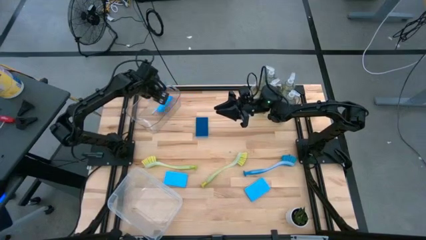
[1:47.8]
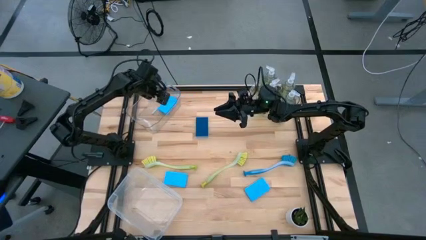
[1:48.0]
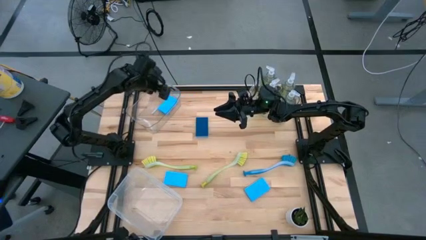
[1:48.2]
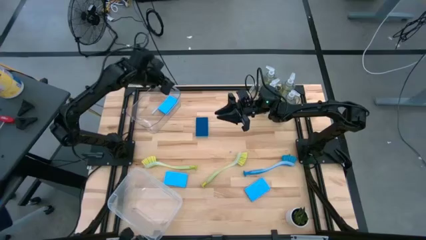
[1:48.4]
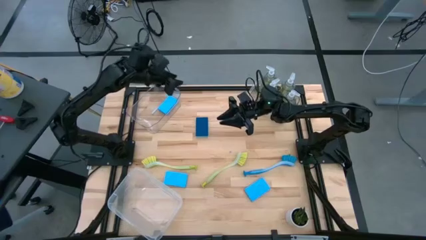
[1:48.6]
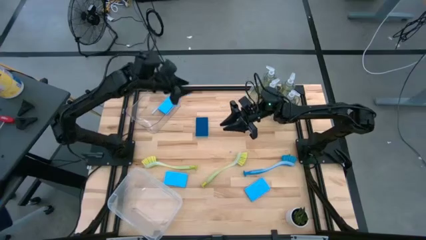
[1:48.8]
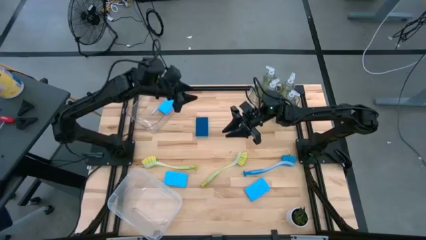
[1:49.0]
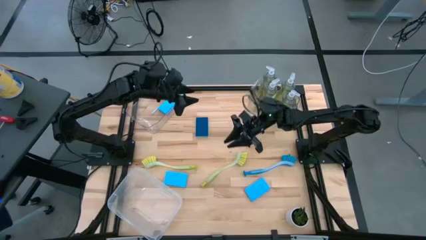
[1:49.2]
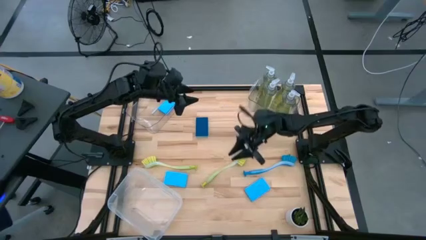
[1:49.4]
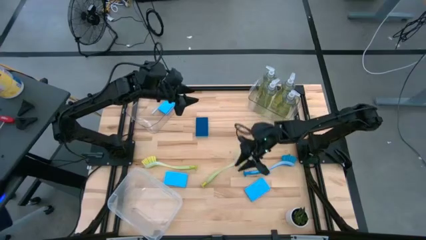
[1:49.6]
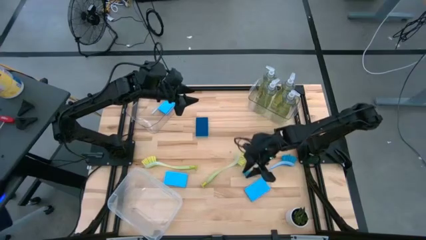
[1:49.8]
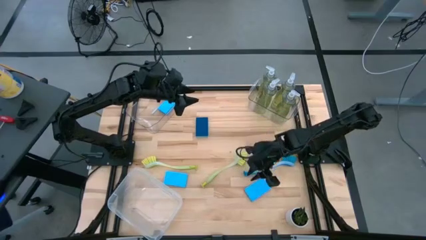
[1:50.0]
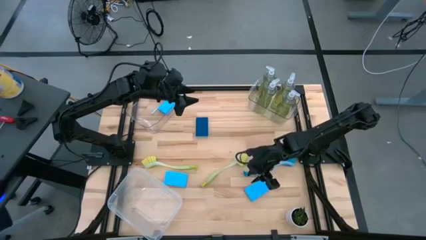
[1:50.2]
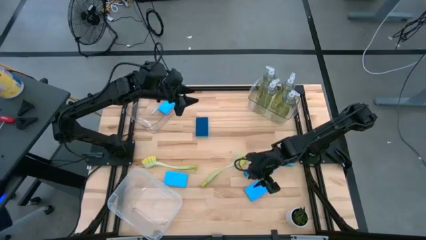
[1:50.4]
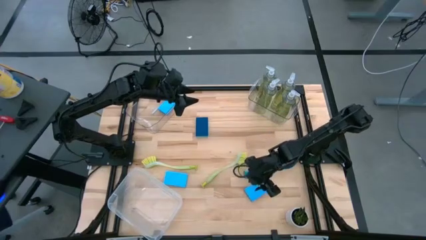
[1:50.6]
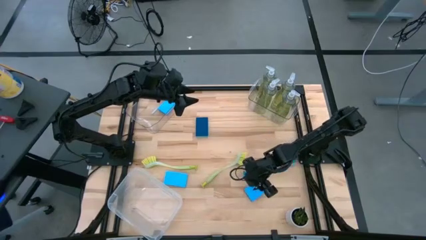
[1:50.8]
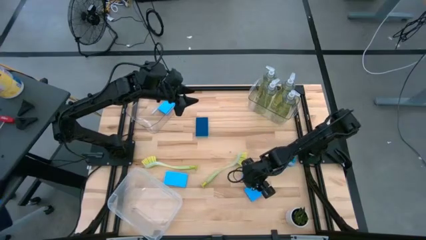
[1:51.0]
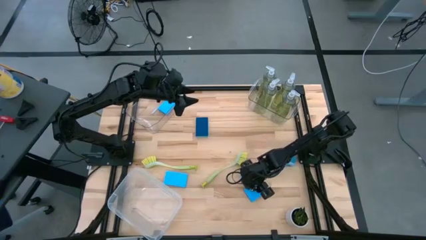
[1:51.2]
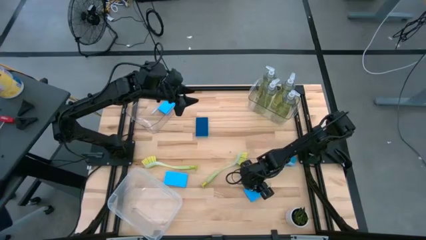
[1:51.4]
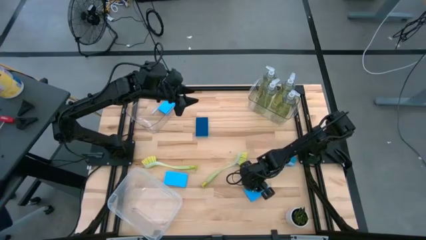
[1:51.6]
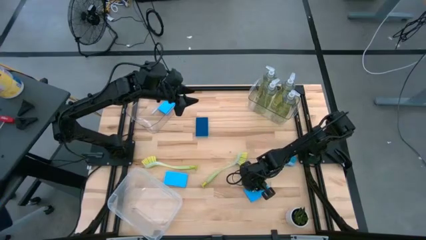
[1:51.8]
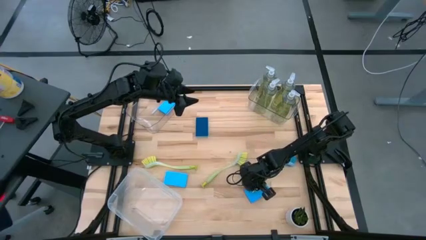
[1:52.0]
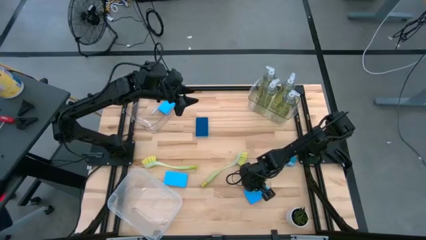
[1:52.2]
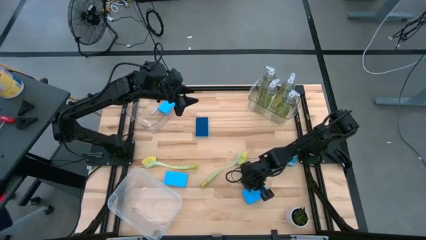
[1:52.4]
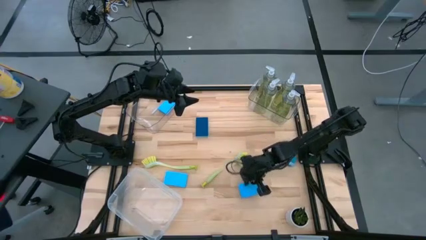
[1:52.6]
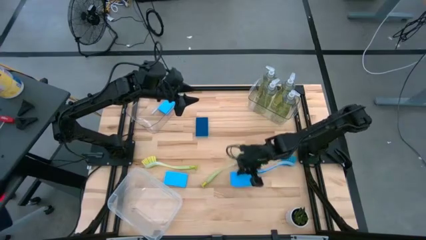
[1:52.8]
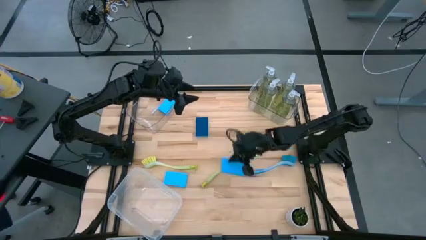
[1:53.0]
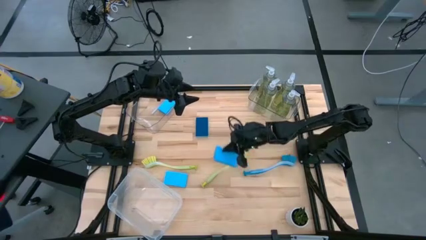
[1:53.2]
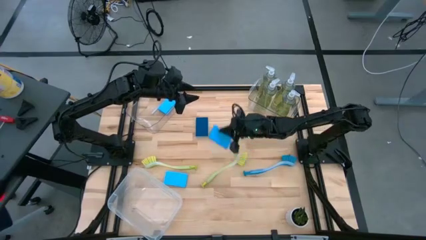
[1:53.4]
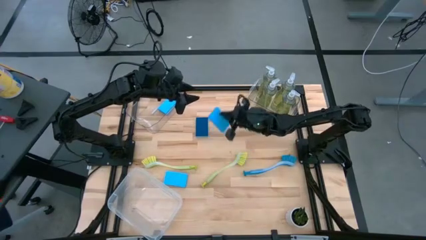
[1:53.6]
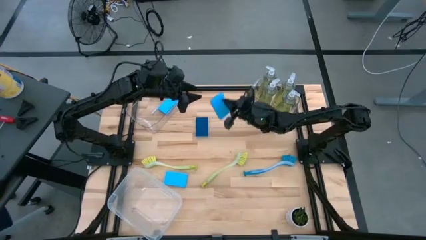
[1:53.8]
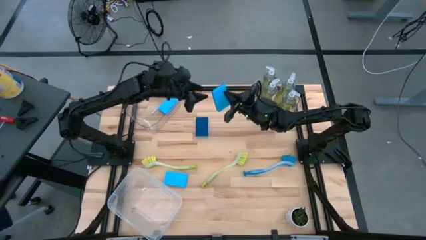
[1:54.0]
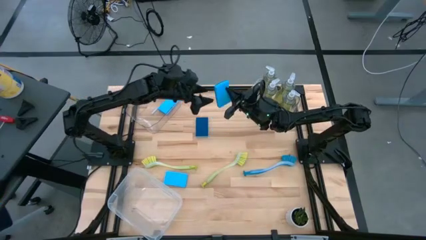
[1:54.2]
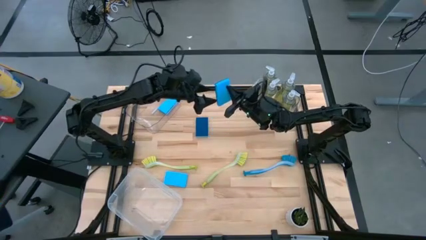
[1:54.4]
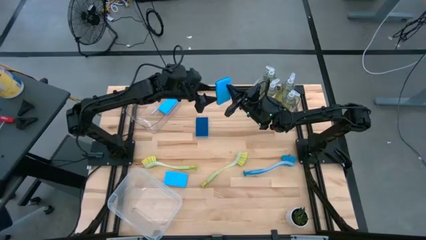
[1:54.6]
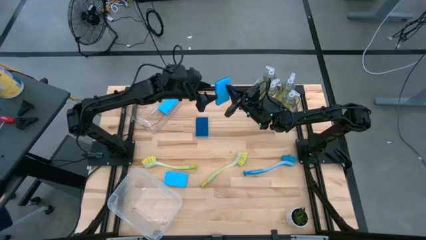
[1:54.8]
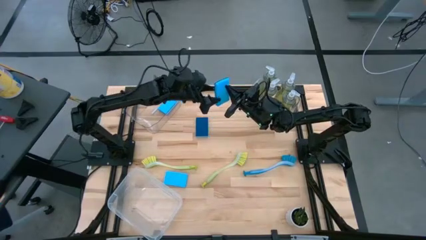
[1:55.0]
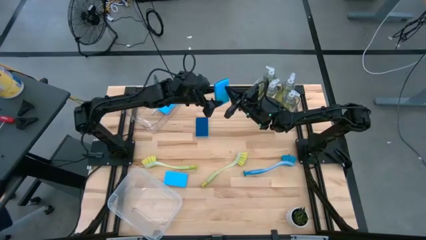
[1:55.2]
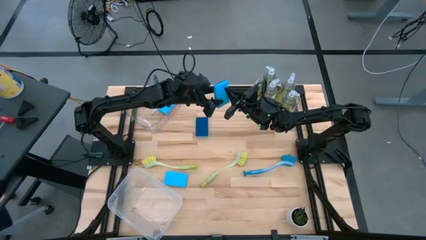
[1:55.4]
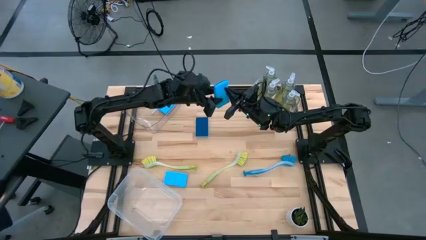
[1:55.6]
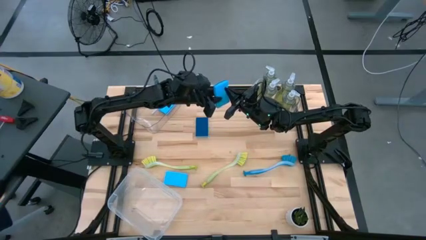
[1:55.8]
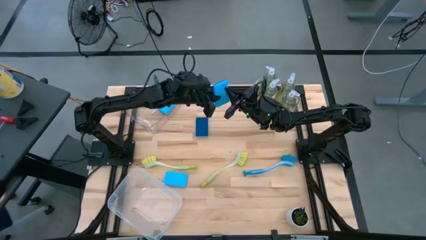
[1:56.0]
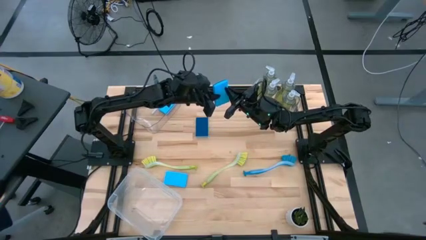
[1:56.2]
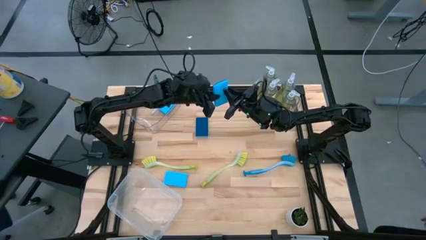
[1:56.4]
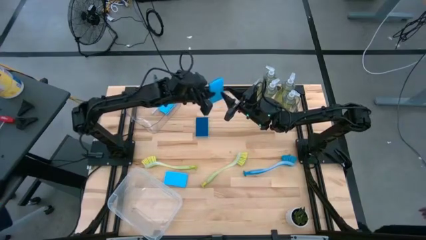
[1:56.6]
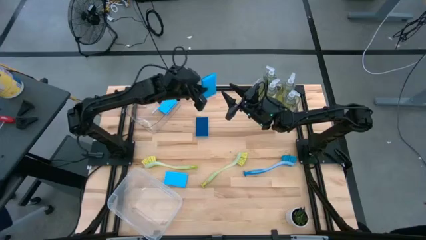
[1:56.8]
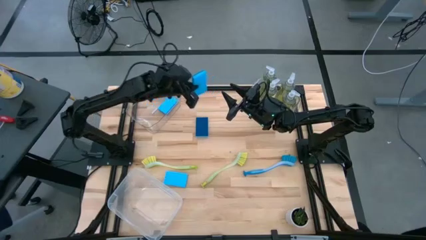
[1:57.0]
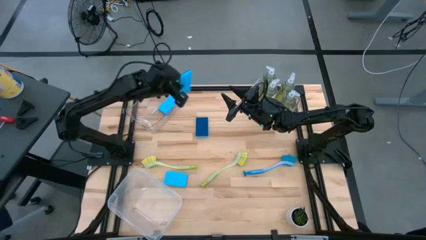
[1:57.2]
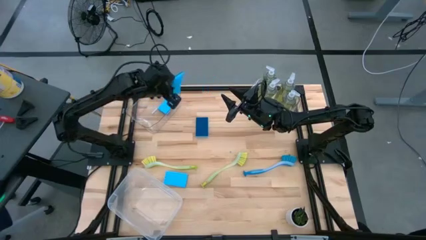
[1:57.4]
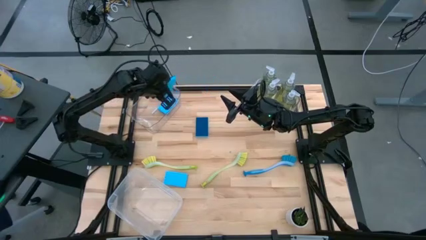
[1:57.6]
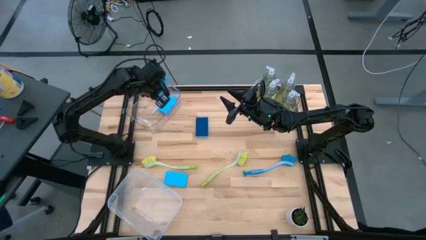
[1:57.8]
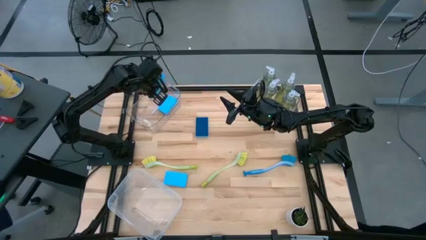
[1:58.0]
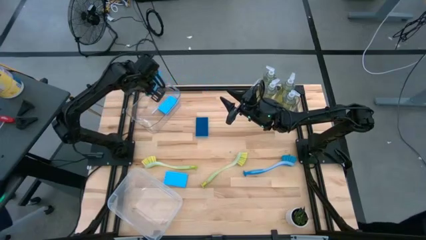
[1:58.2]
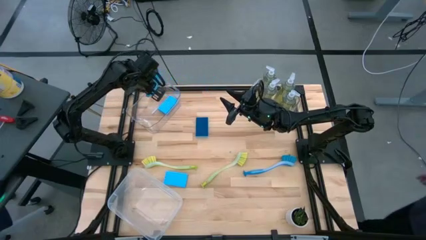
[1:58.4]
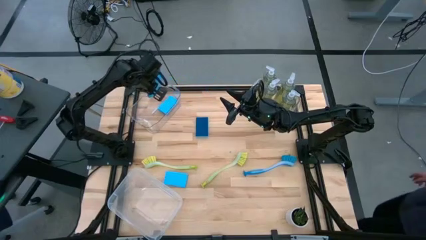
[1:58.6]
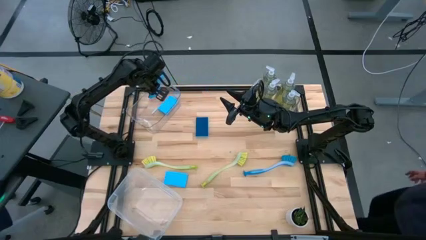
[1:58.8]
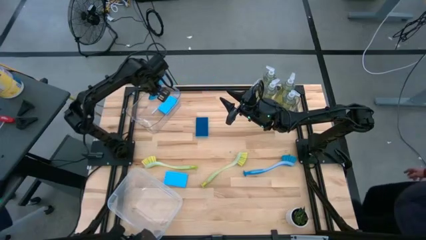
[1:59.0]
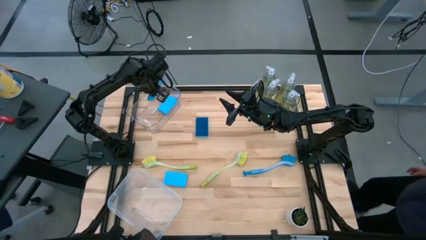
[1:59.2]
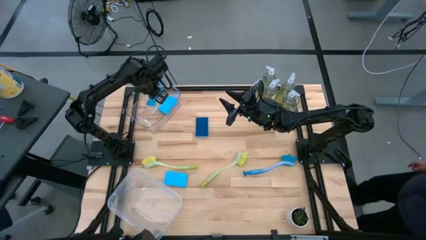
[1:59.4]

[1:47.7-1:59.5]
Task: Pick & Place Kitchen Sink Supplies
Put the blue sponge into the left transparent bin

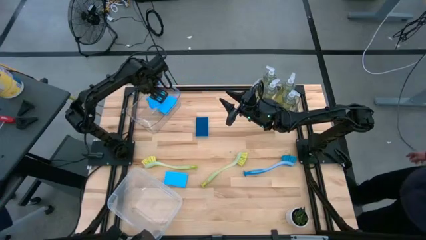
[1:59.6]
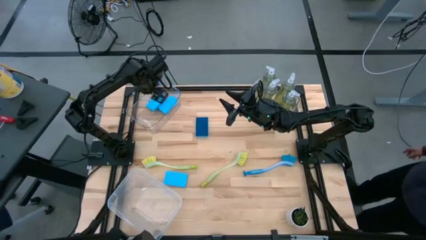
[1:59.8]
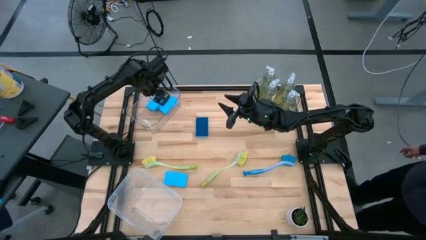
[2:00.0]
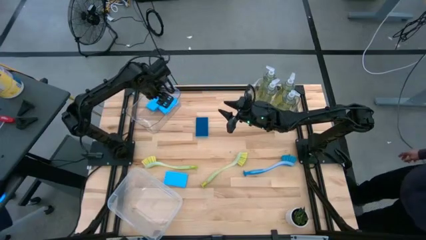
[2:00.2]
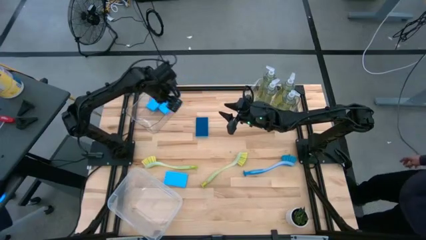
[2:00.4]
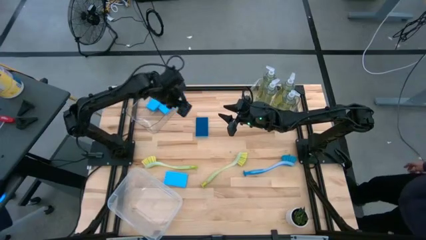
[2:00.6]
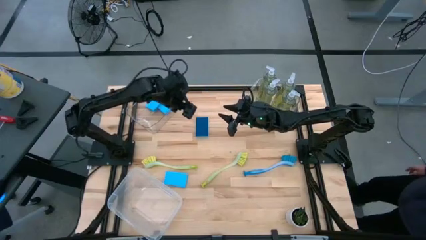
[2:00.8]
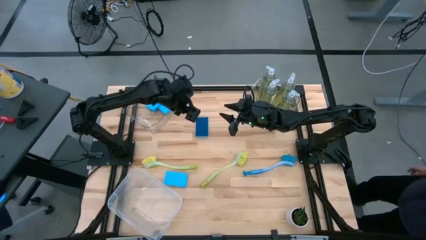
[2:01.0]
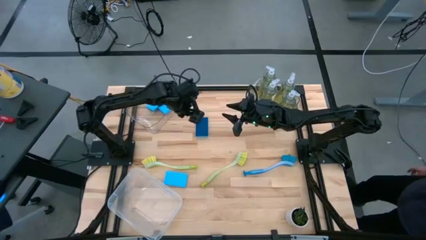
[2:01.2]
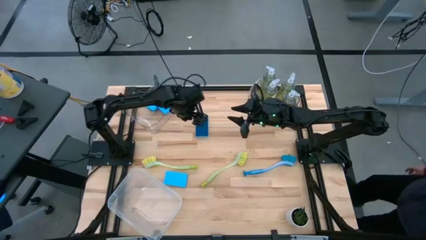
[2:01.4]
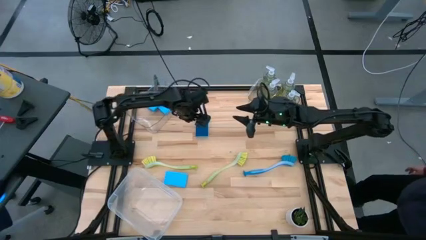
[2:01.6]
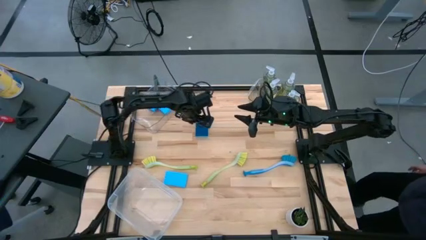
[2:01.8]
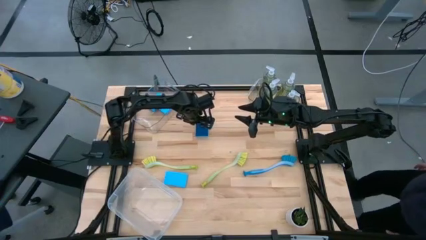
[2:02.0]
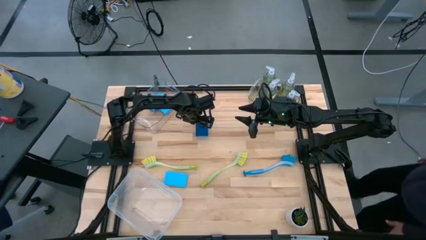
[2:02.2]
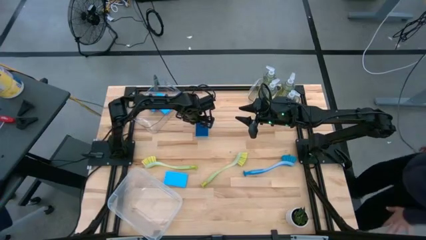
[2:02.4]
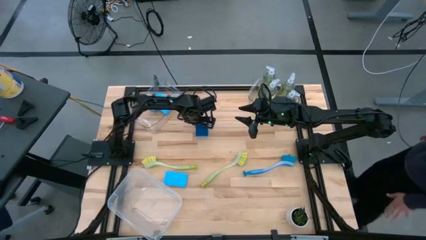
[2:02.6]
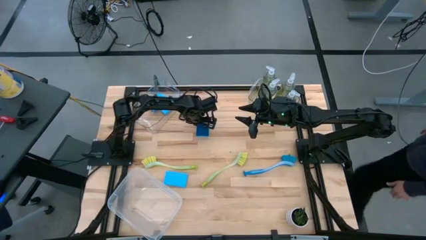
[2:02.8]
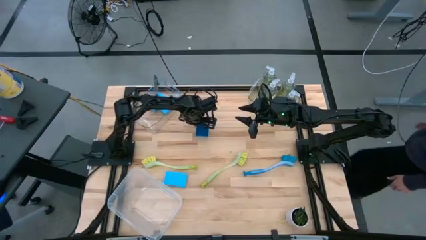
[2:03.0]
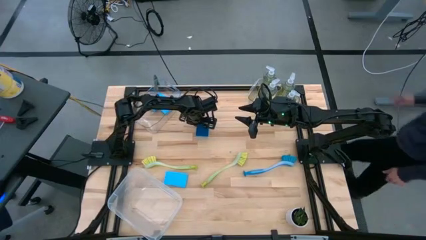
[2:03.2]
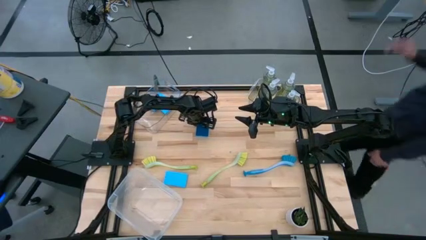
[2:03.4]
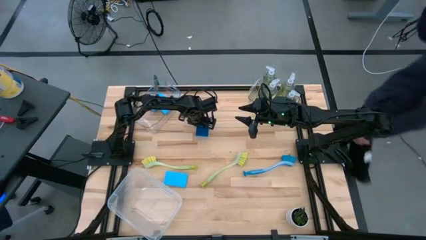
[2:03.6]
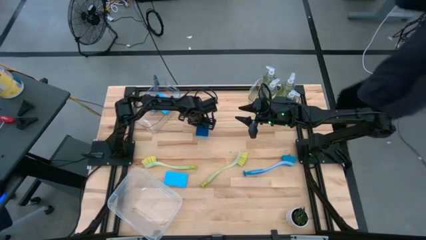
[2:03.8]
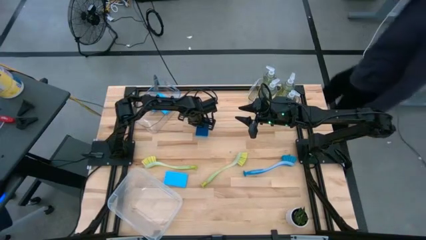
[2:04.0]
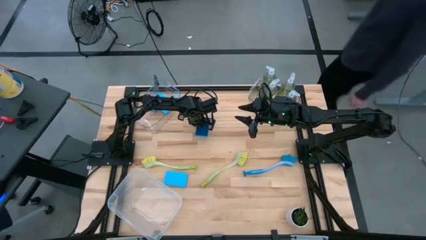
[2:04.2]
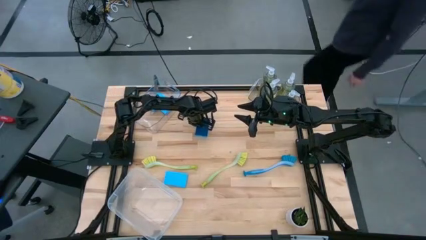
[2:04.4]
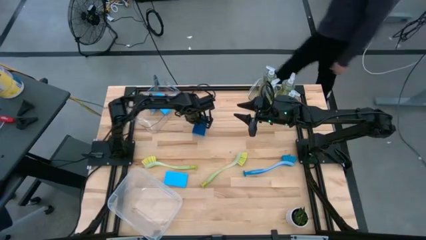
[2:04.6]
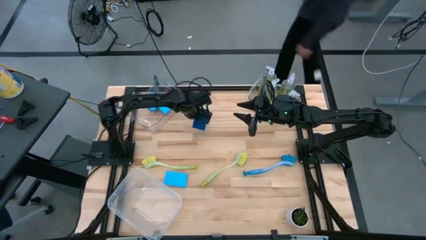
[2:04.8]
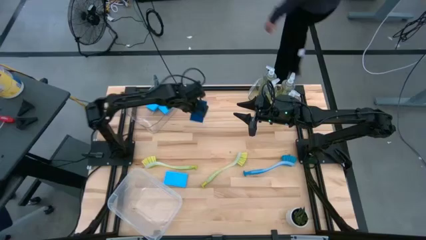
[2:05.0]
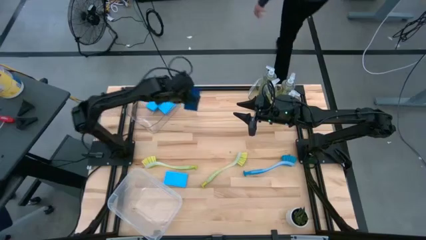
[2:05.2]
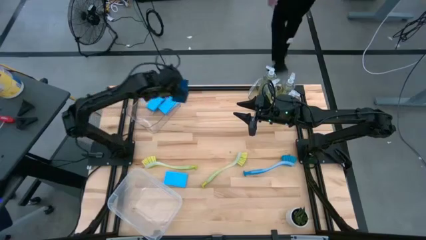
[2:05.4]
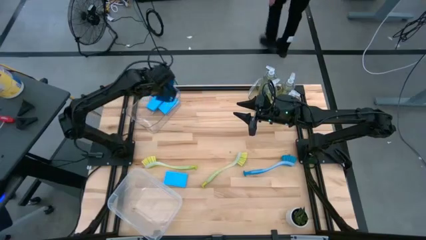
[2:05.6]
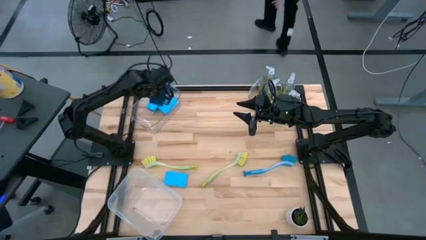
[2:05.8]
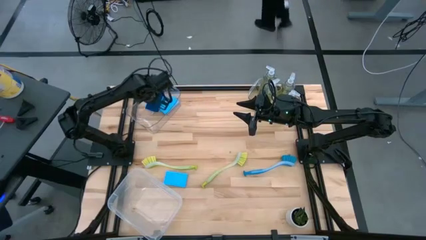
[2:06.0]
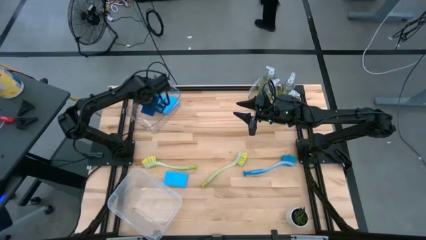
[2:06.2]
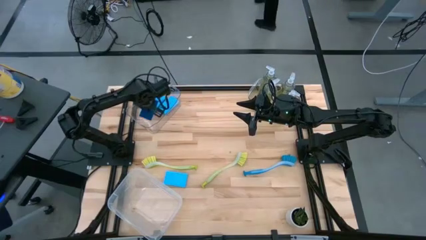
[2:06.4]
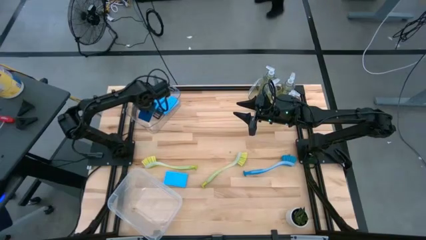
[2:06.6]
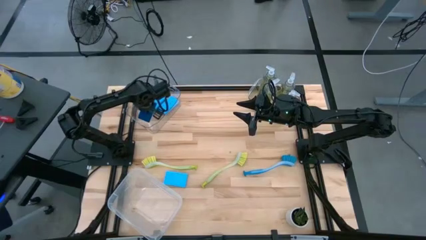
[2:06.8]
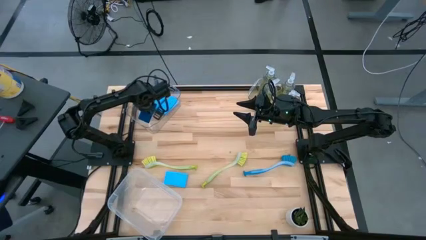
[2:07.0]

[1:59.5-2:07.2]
Put the blue sponge into the left transparent bin
